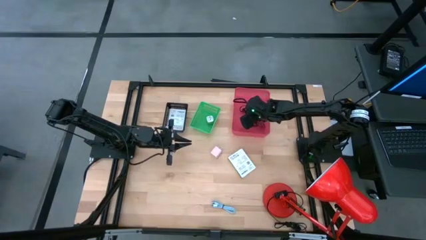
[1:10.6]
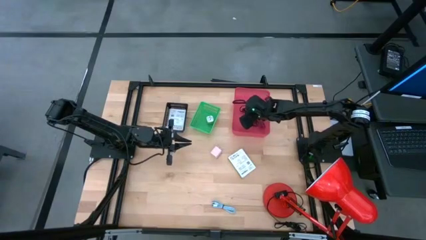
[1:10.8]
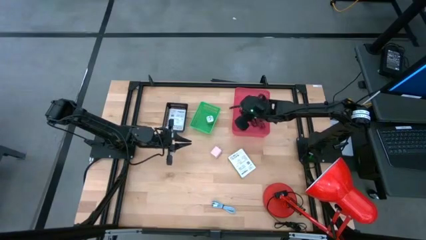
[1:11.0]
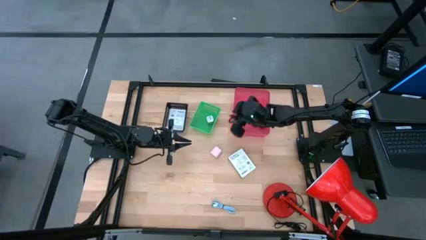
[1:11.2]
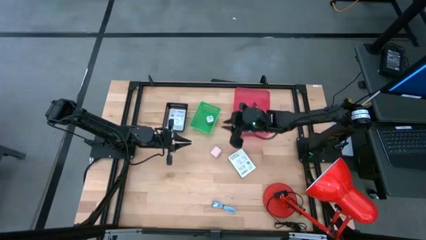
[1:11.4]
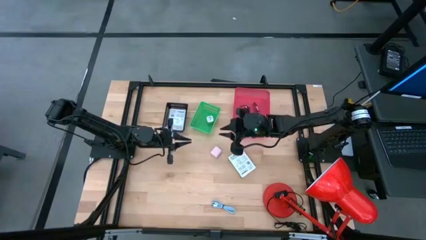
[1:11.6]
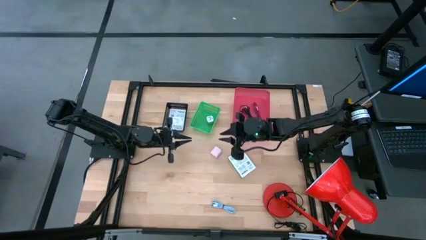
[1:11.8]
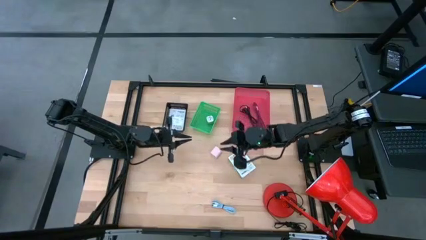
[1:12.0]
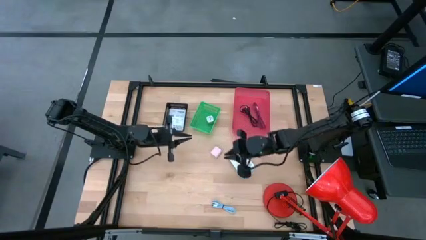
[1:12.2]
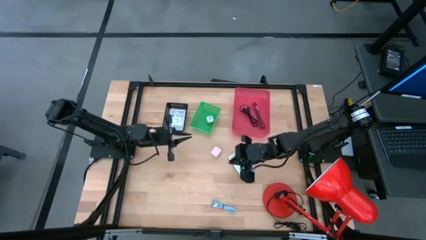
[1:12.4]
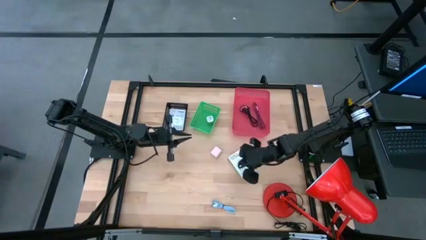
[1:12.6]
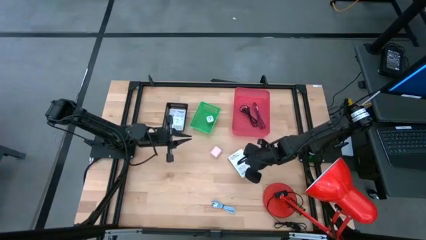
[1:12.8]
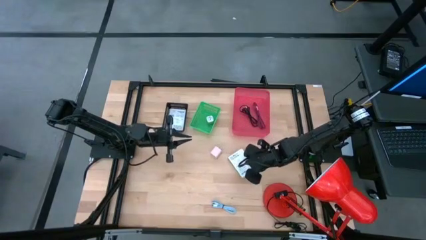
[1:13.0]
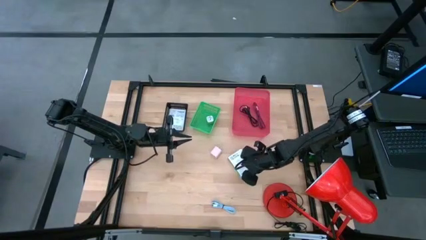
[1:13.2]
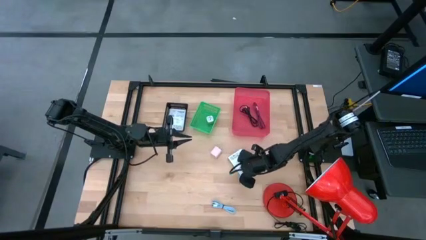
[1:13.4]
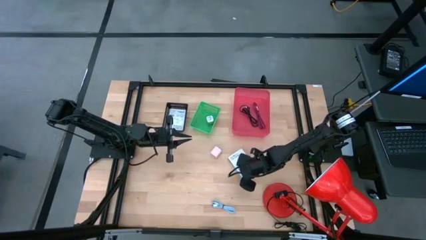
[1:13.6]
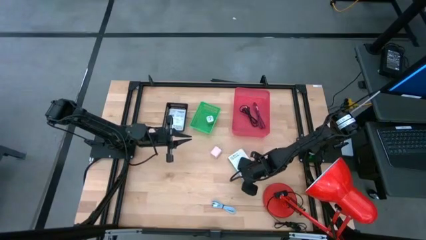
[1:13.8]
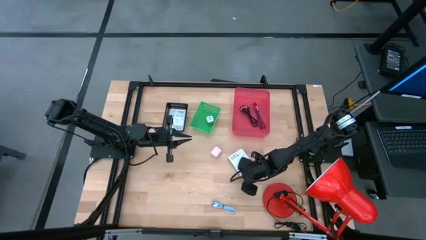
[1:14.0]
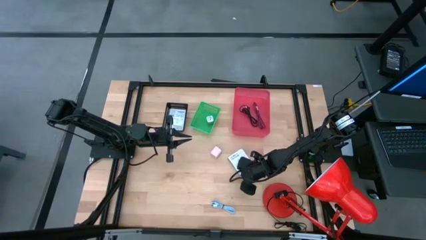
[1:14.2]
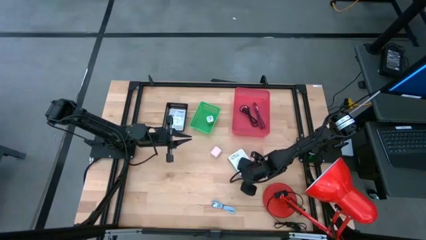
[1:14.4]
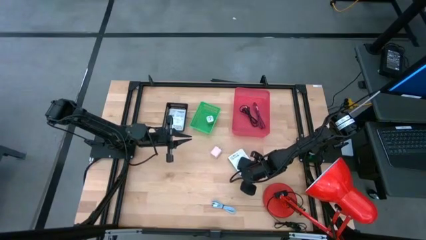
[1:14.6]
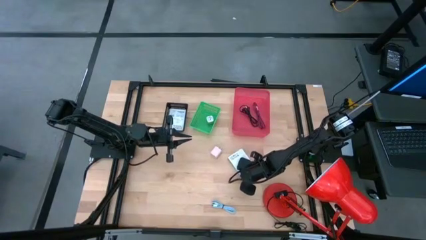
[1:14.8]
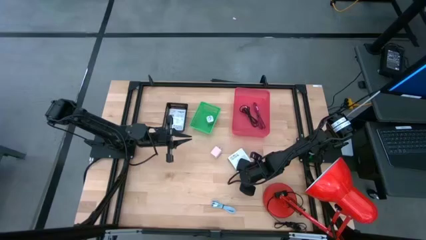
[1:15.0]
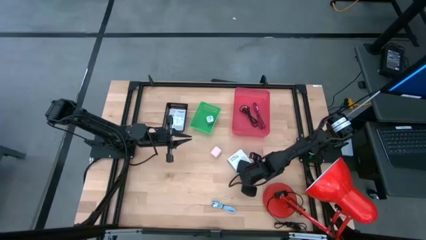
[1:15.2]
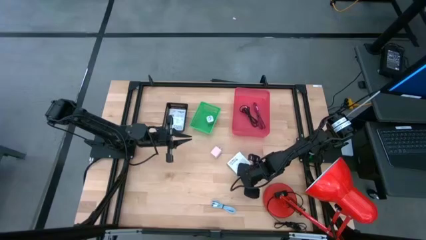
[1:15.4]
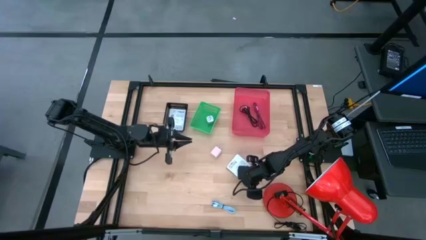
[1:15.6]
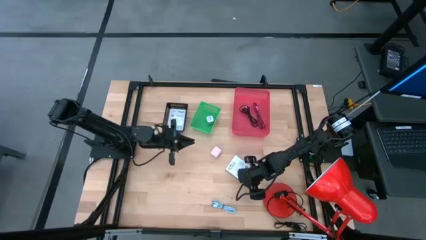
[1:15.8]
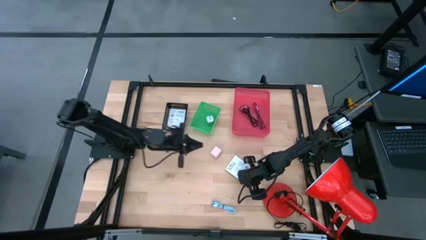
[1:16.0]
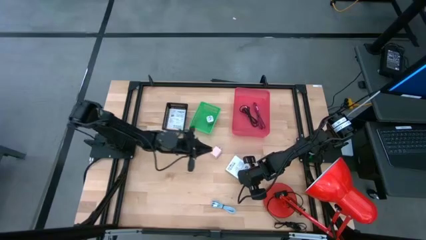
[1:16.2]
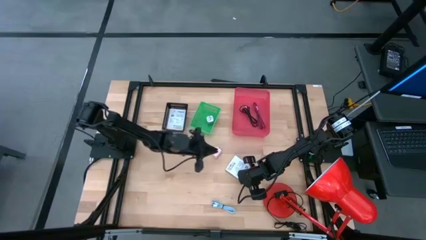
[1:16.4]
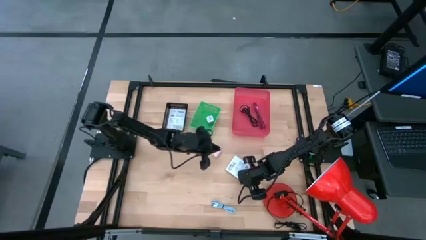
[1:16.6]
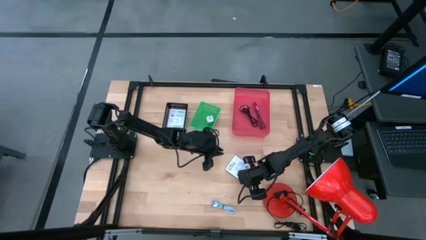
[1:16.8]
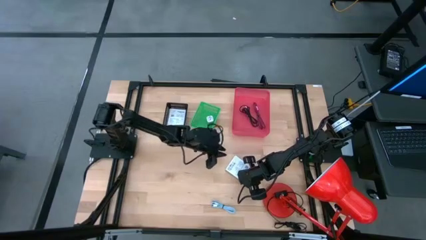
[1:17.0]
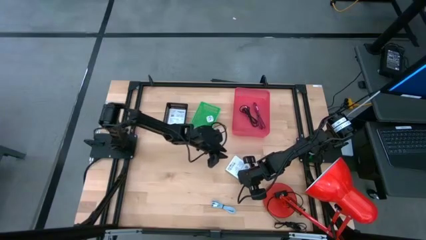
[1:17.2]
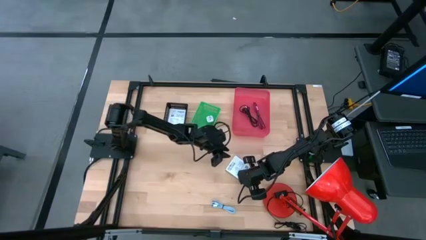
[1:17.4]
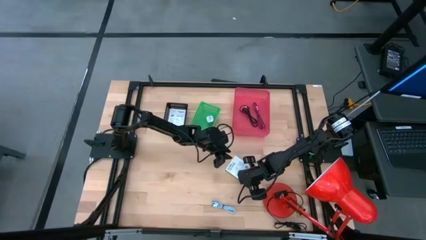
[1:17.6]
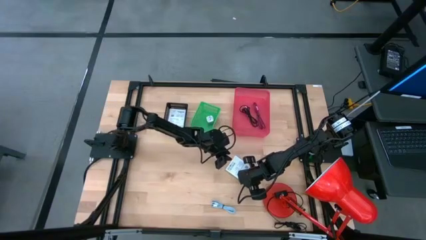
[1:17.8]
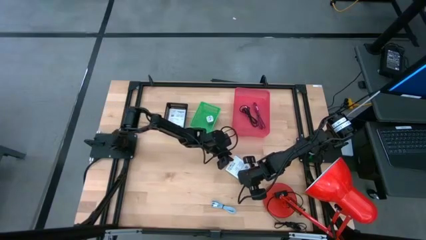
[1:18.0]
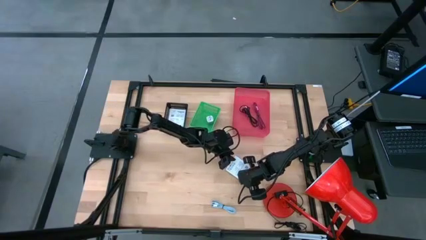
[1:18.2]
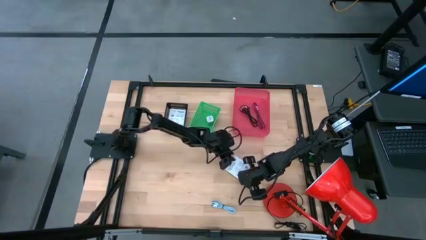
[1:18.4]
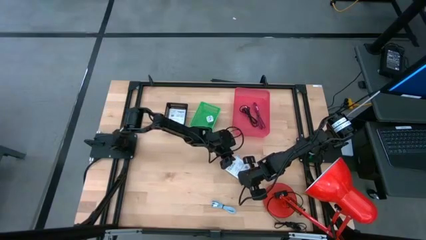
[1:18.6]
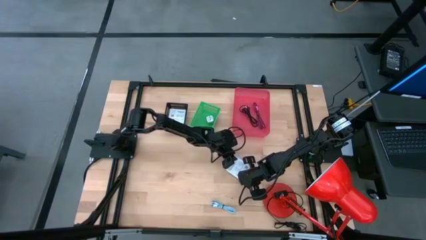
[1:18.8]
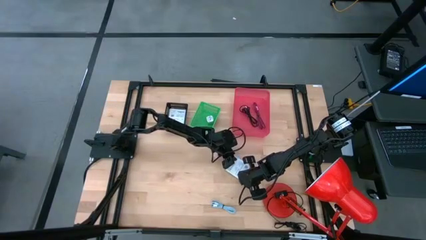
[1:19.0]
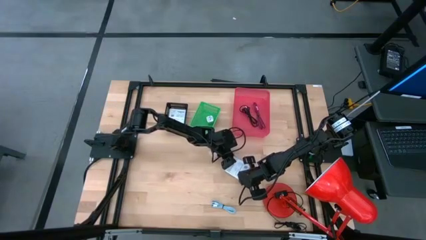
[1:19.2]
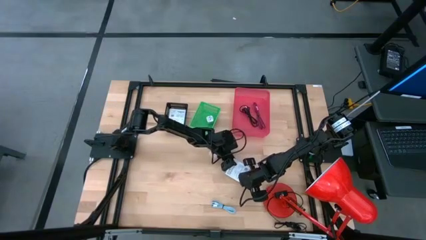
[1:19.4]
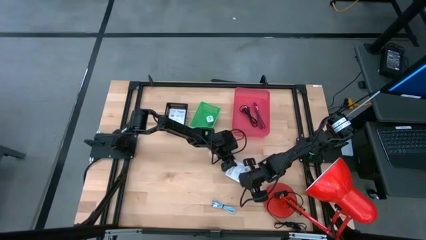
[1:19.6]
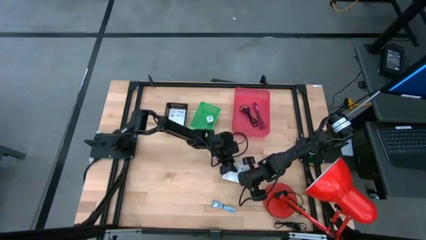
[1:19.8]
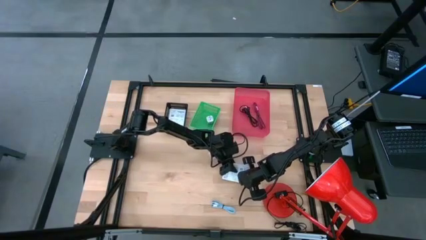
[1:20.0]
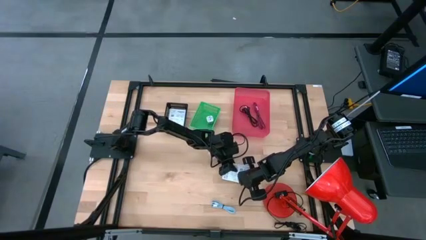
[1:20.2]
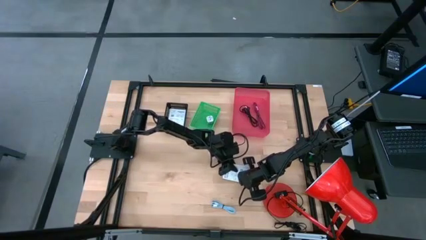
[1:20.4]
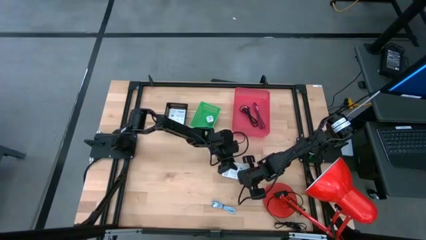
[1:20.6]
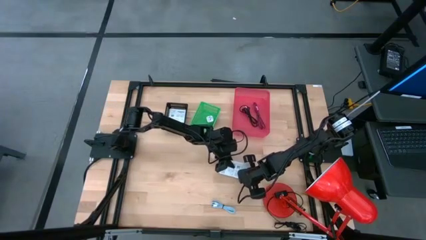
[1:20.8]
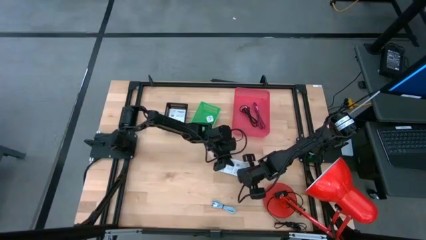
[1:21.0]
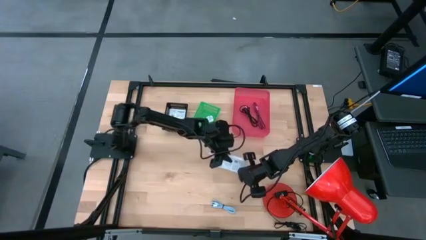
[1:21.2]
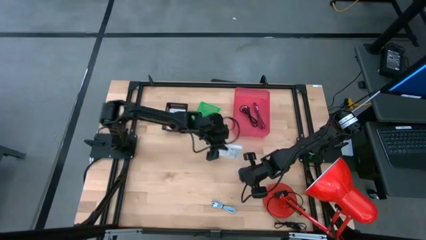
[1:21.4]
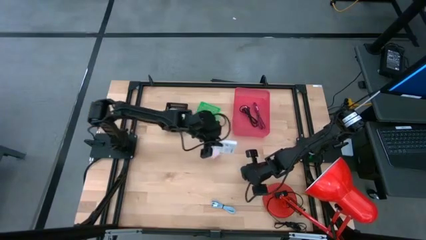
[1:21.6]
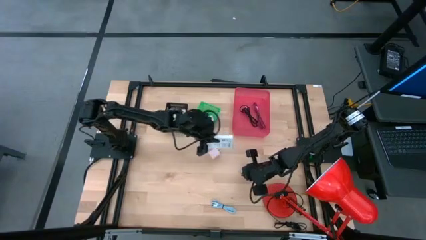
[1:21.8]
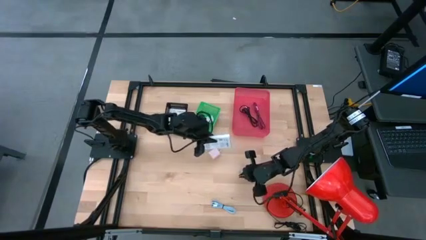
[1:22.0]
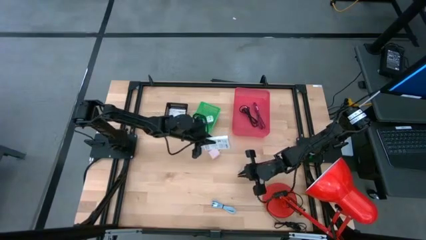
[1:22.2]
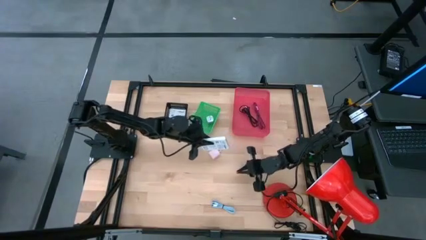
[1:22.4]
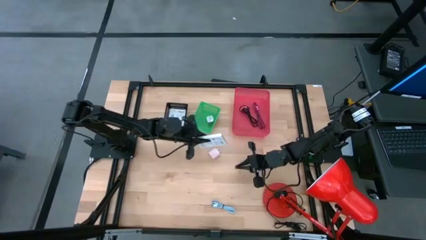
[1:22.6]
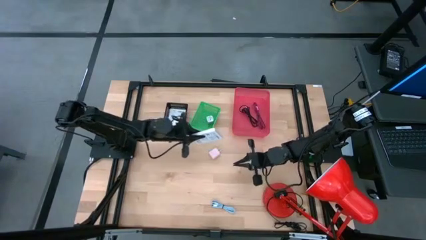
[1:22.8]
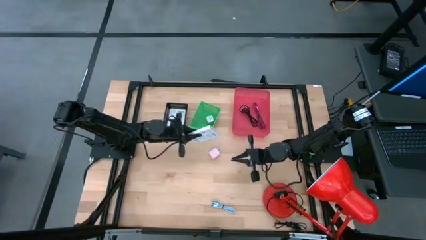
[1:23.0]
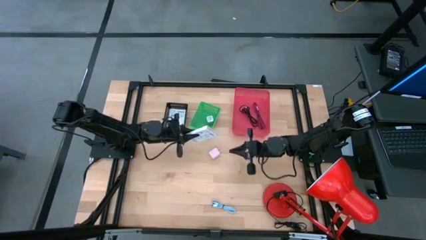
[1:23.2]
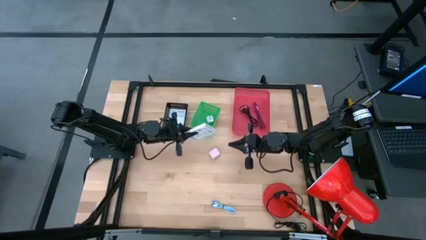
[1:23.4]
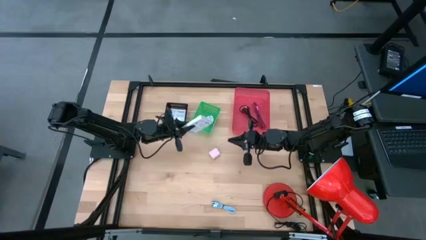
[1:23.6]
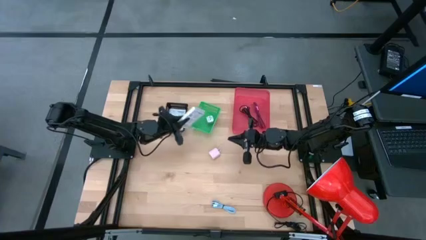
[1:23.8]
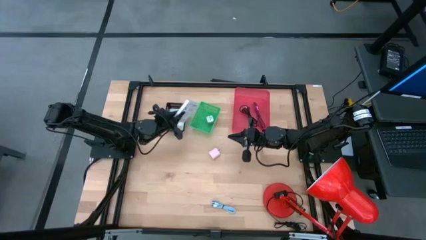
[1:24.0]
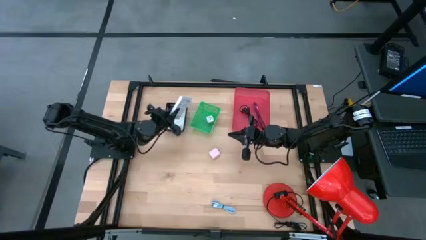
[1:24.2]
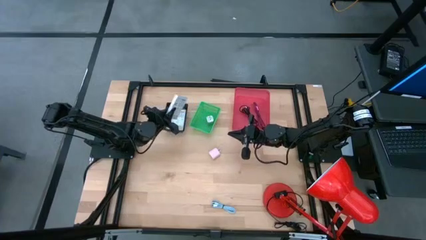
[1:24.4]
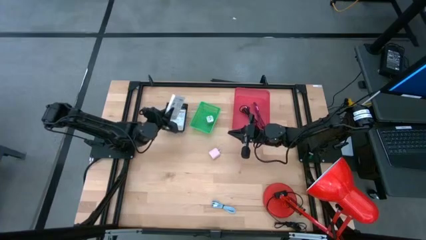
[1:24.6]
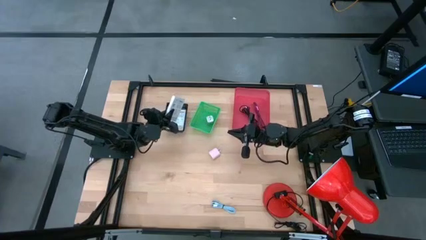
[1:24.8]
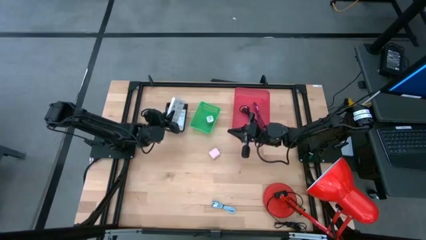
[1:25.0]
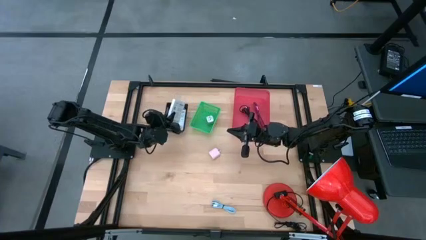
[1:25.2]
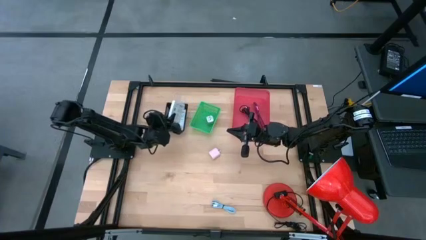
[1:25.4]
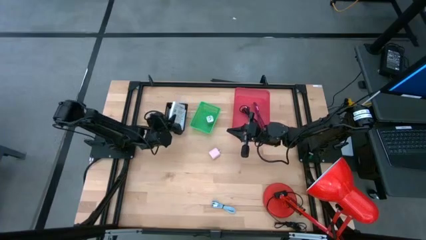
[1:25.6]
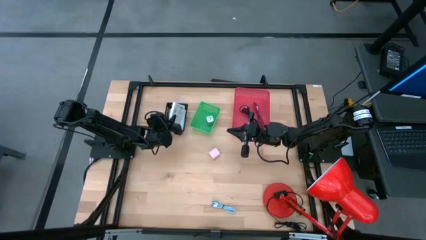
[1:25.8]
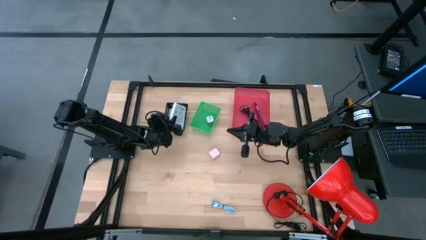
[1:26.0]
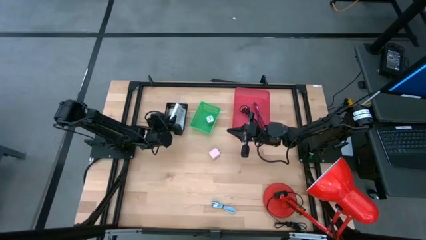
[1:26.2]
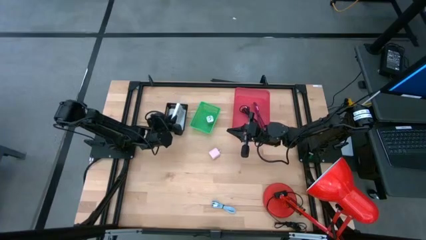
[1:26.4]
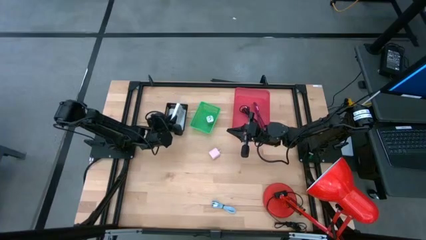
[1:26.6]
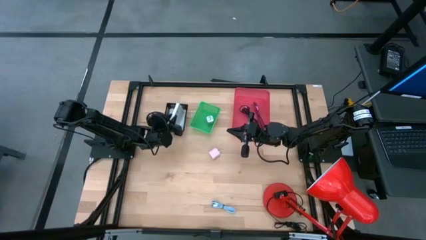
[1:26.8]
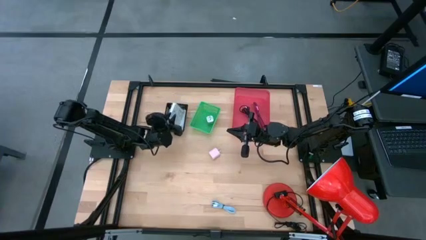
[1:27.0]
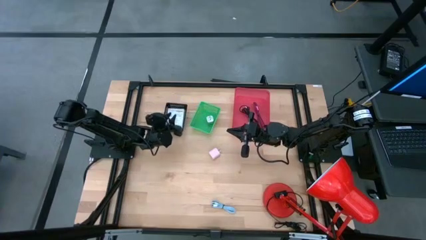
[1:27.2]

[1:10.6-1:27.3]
Task: Pick and place items into bin
Stack the white box on top of the white box
